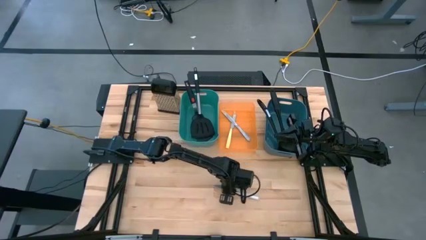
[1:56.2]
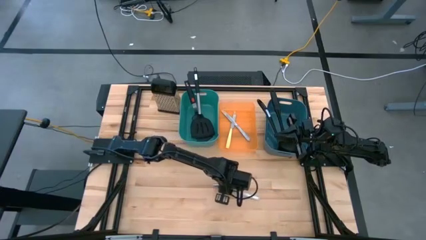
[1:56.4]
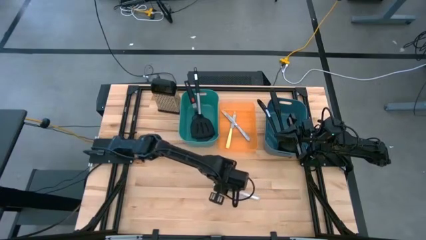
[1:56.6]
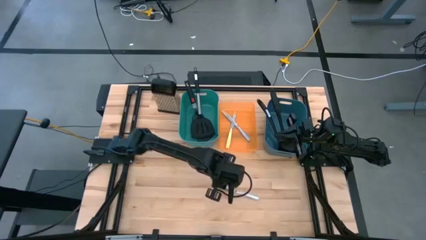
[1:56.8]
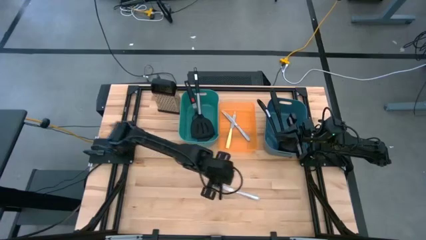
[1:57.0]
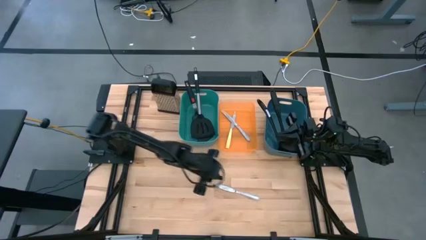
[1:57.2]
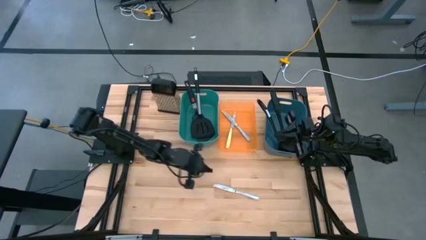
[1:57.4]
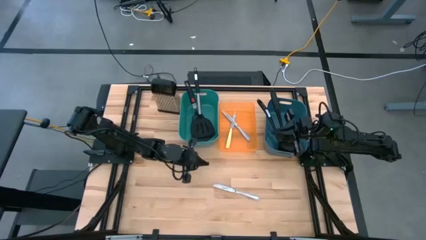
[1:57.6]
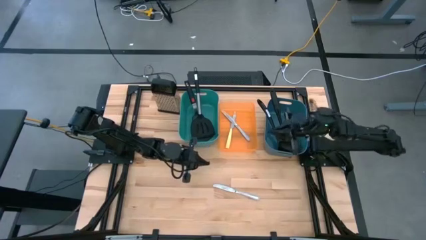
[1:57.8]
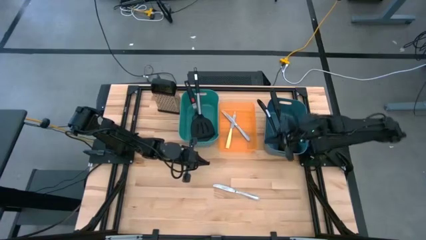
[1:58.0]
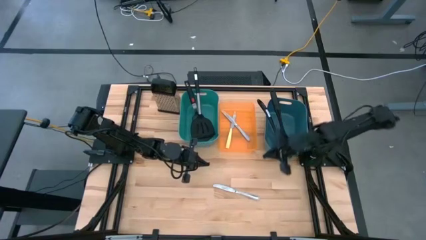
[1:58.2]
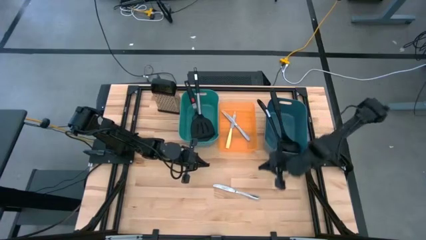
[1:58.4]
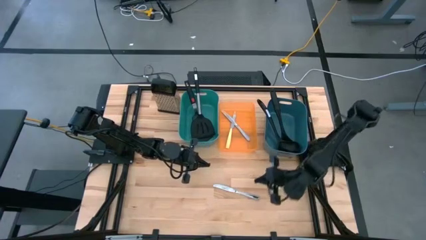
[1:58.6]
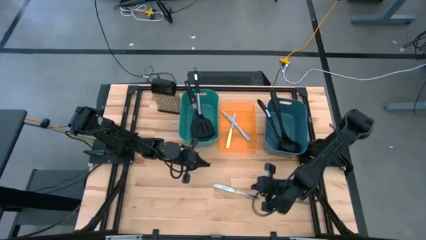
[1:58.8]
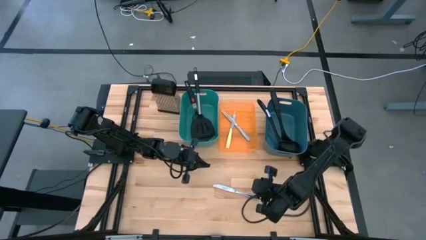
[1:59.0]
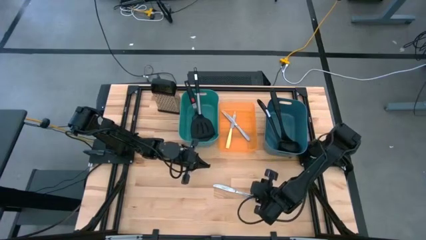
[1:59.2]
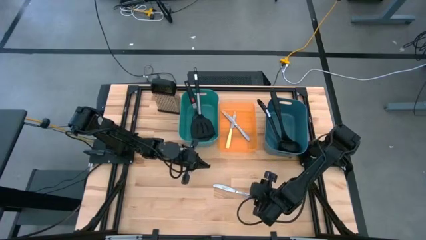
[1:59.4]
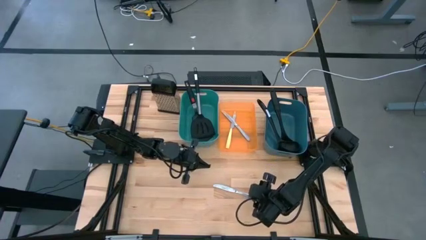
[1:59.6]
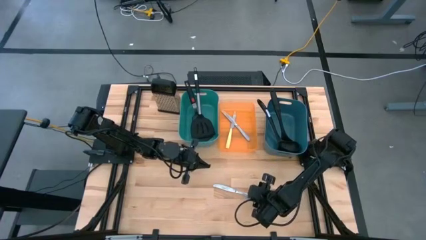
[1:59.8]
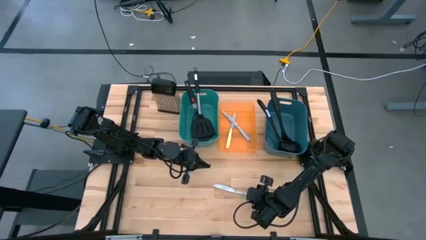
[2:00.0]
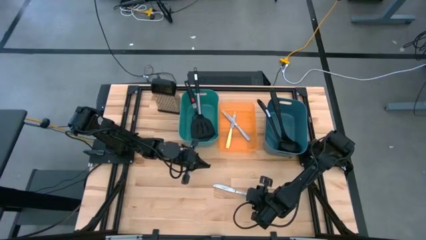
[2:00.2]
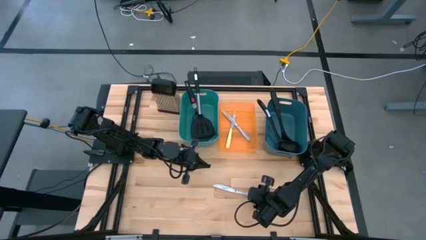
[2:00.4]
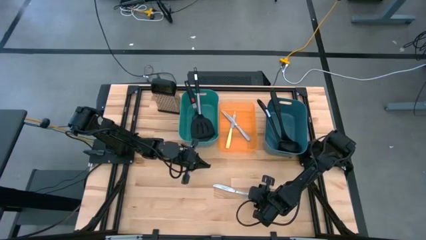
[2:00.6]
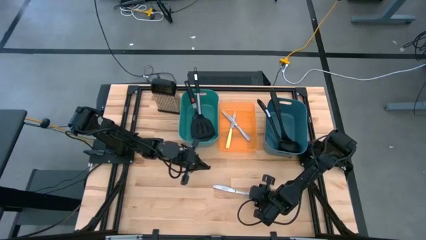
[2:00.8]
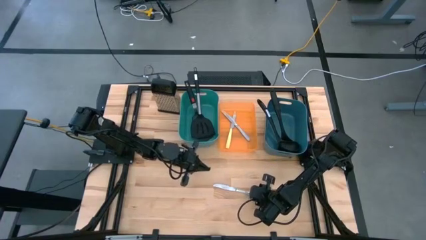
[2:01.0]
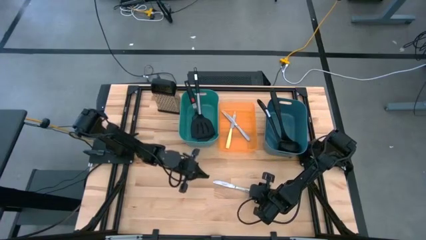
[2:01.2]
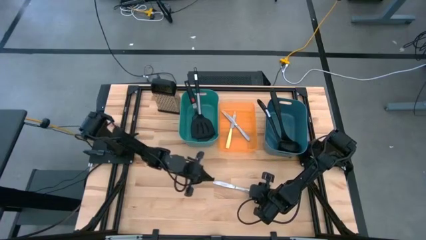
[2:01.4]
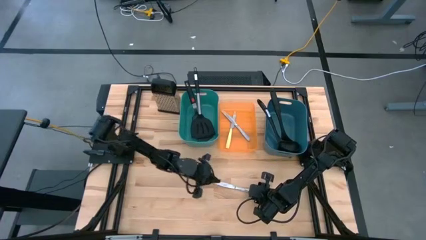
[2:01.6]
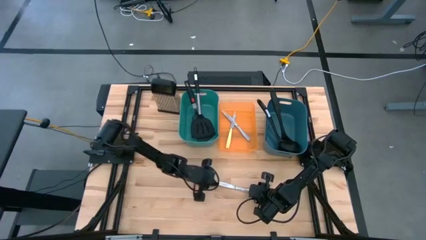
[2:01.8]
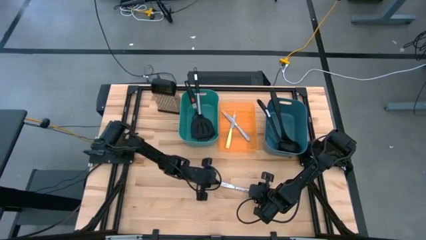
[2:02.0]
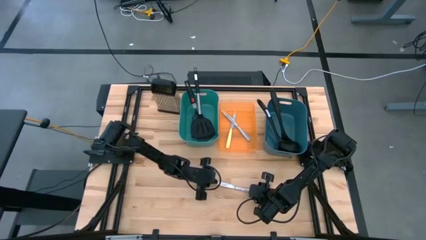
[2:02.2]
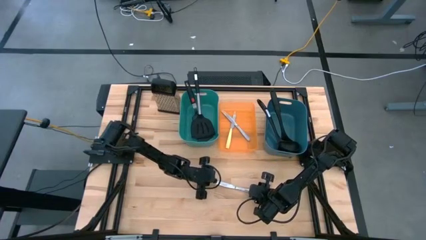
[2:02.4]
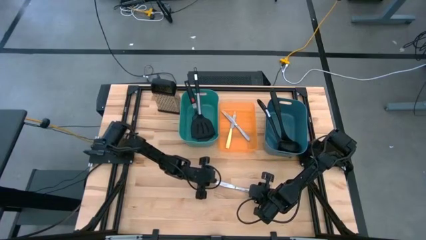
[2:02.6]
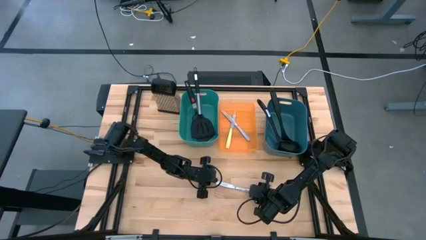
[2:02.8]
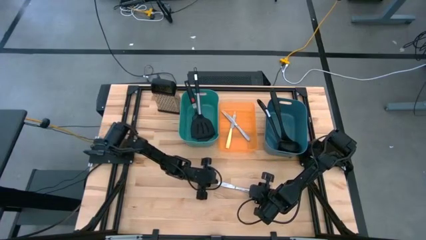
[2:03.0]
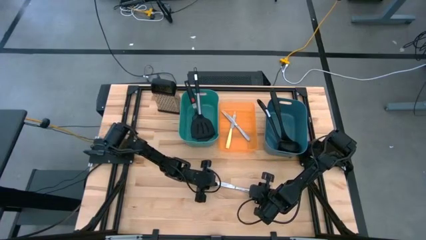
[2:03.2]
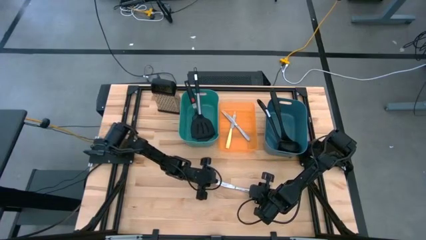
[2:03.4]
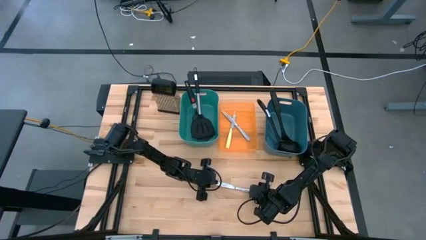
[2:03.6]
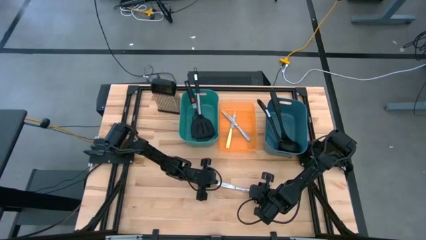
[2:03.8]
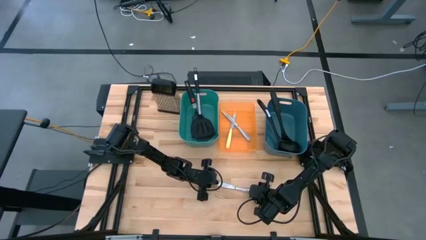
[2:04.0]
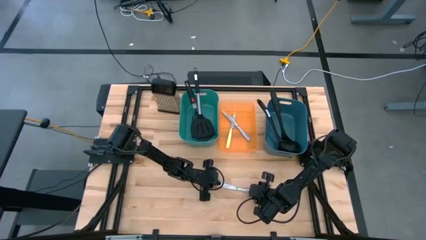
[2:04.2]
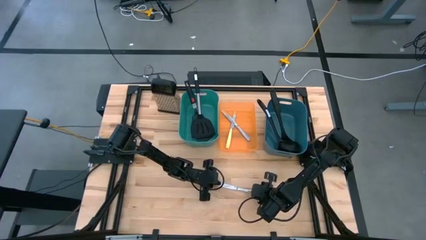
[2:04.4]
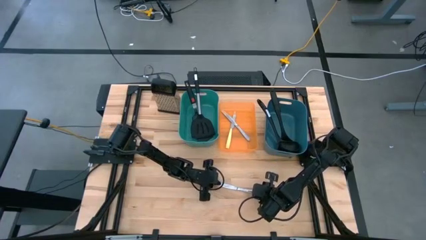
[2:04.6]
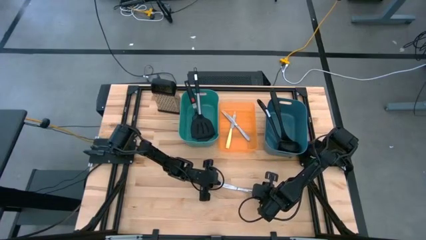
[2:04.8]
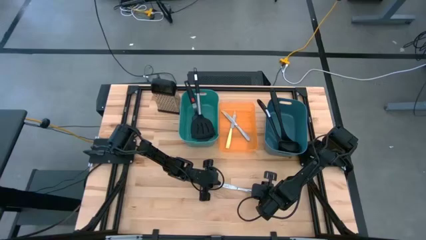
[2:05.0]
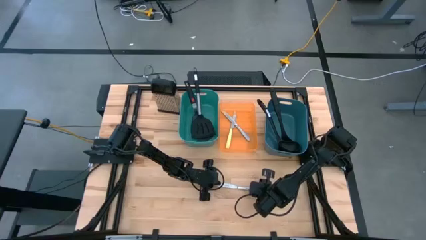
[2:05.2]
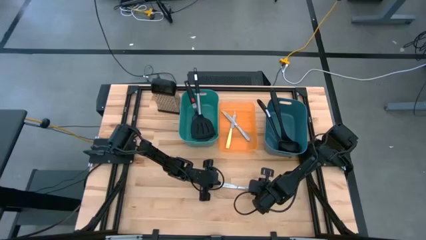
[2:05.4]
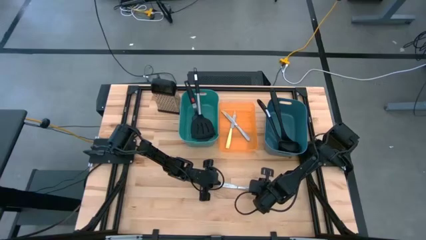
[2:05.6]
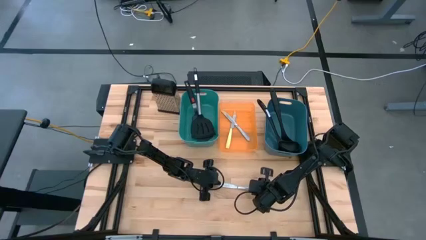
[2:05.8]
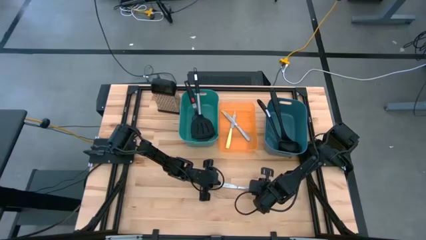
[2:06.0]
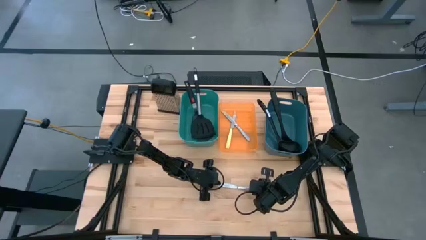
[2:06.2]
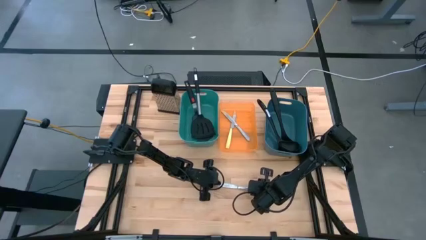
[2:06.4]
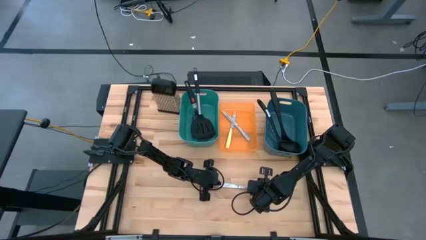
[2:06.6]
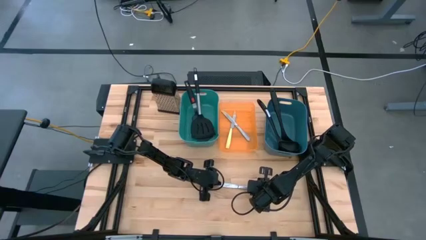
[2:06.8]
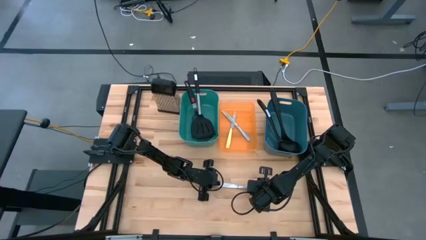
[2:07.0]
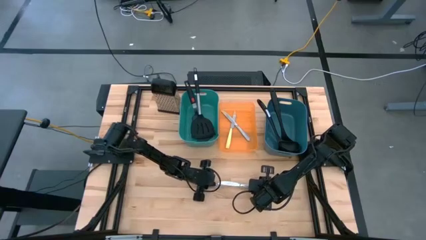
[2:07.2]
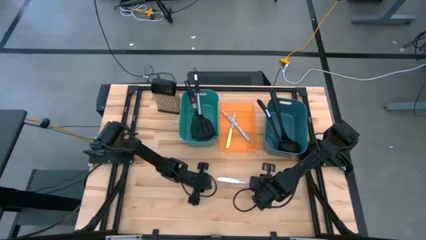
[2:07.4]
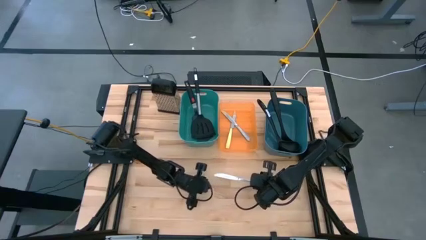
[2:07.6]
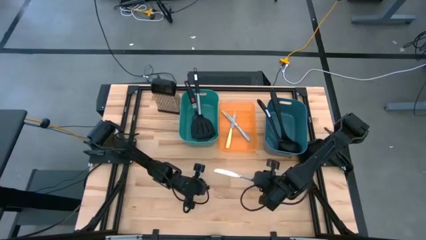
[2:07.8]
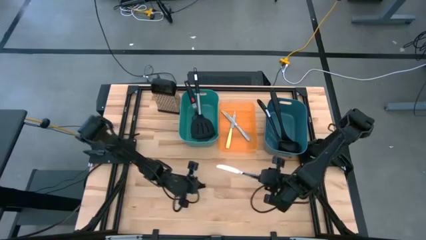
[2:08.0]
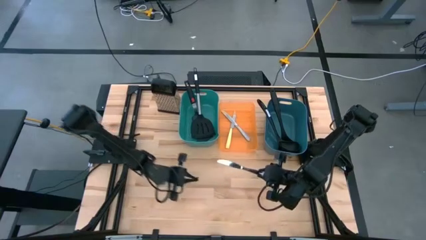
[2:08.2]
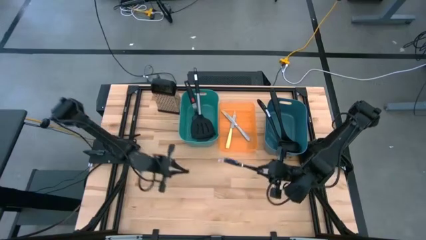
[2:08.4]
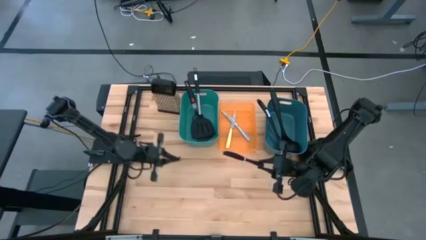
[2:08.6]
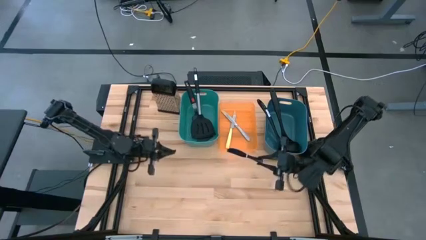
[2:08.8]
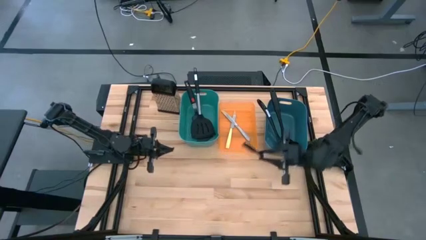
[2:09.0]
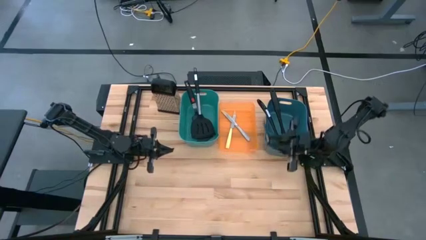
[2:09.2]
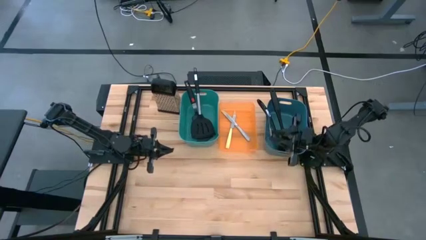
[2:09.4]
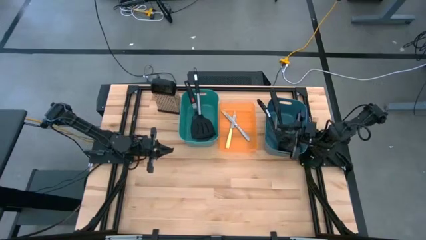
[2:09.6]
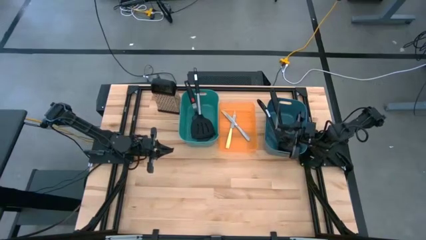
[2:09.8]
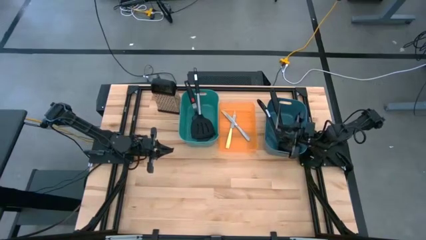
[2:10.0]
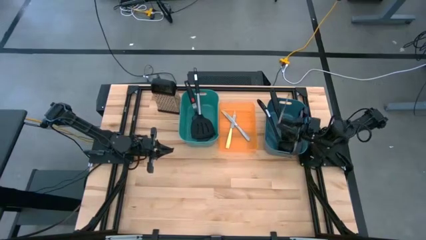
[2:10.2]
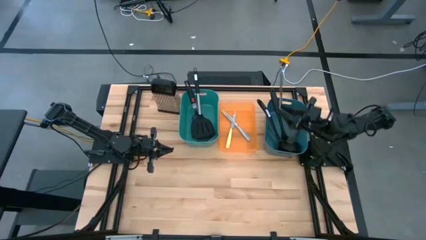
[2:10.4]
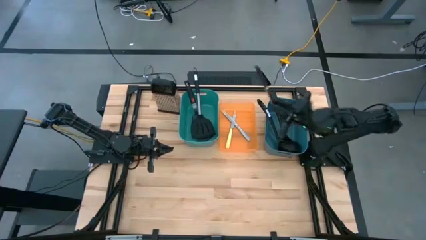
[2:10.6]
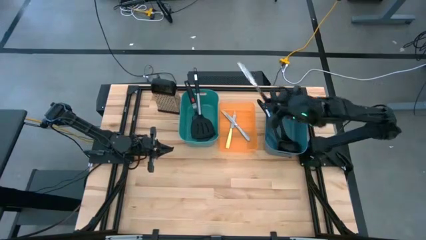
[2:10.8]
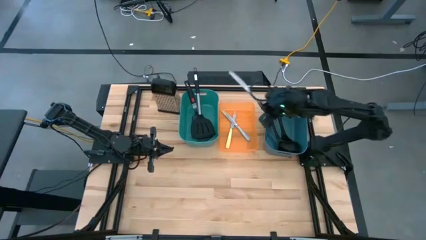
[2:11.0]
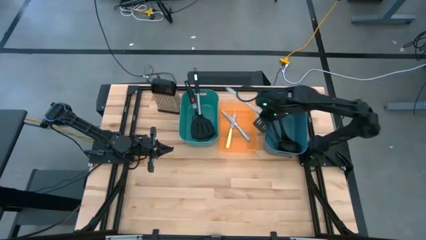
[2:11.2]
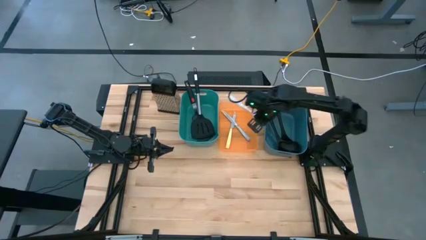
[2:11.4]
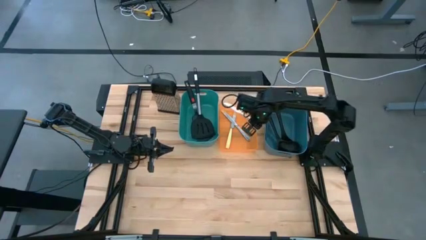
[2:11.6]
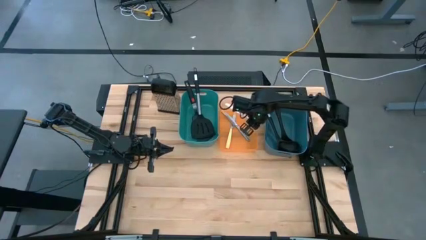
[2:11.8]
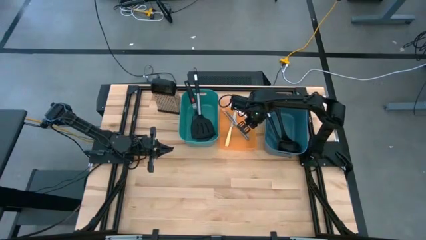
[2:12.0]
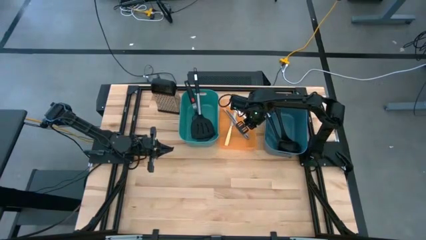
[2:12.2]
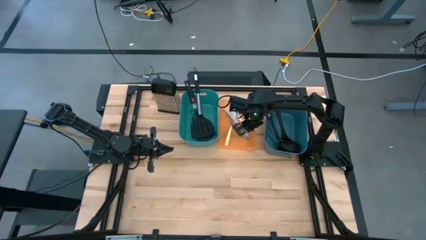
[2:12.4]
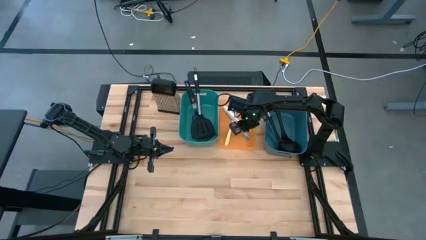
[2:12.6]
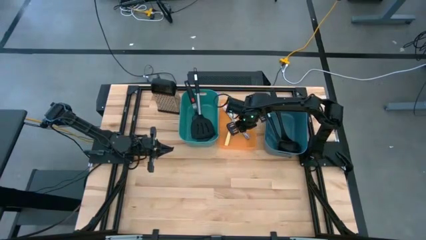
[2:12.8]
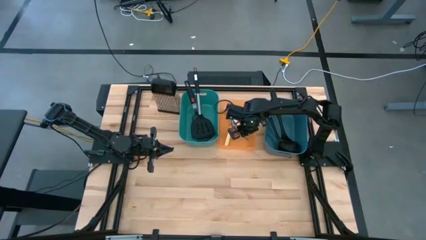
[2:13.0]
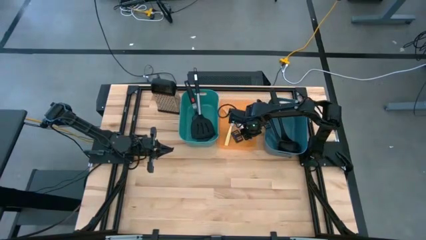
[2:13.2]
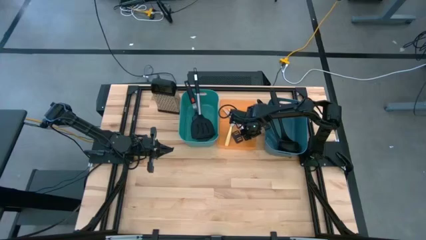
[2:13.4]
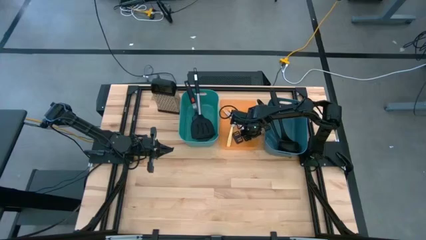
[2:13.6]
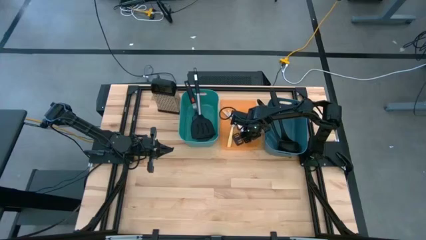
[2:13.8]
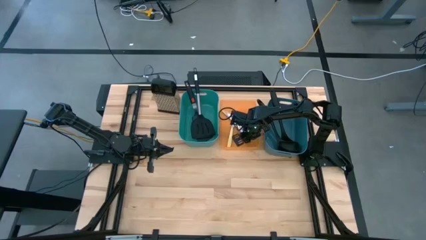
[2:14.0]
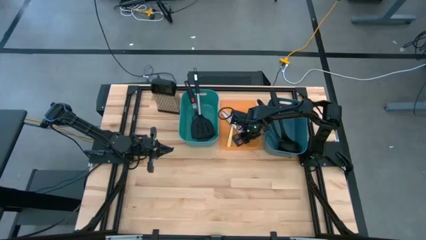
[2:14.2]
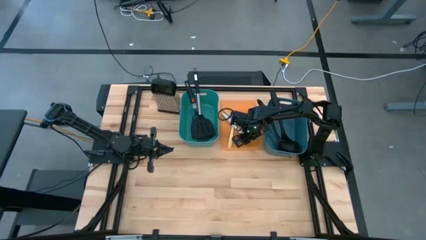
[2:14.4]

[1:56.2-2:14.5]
Task: Pick & Place Kitchen Items
Put the silver table knife into the orange bin
